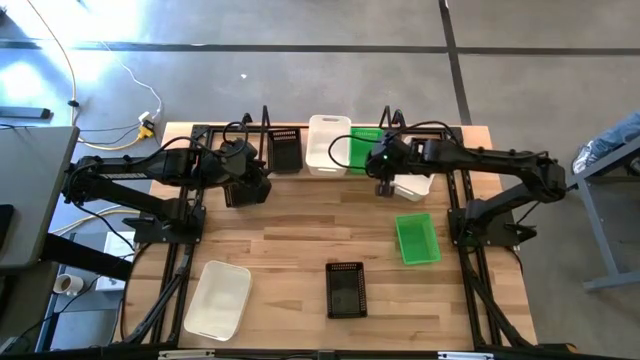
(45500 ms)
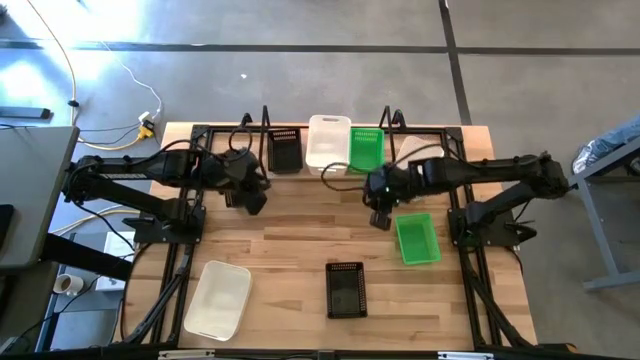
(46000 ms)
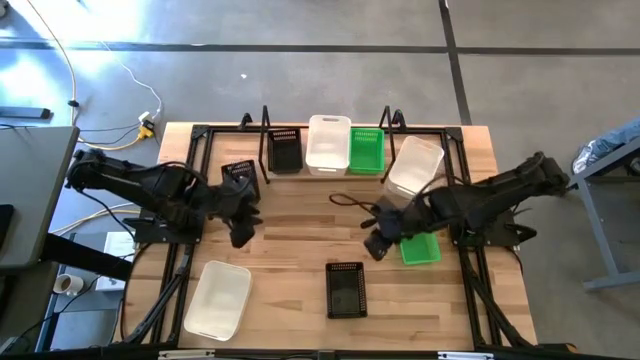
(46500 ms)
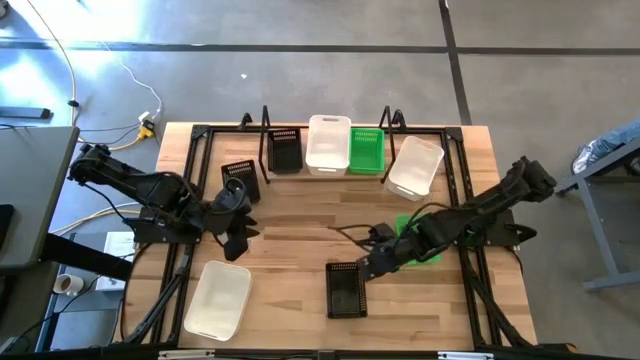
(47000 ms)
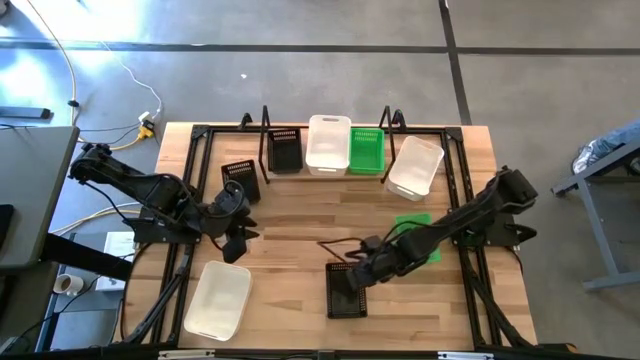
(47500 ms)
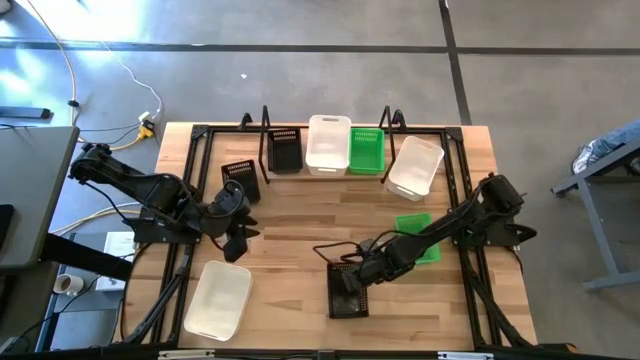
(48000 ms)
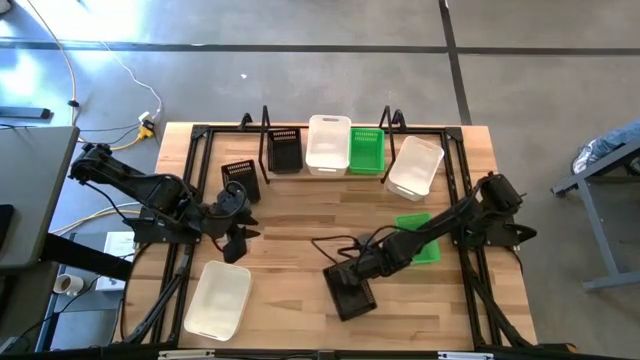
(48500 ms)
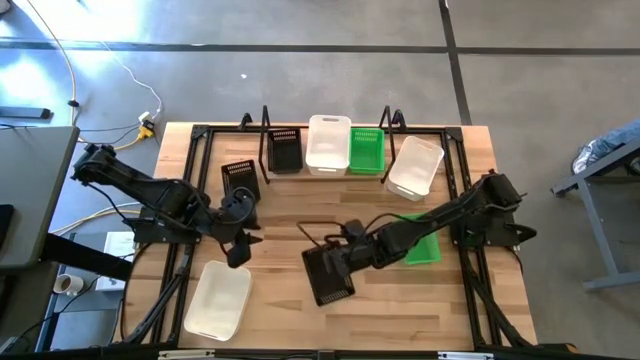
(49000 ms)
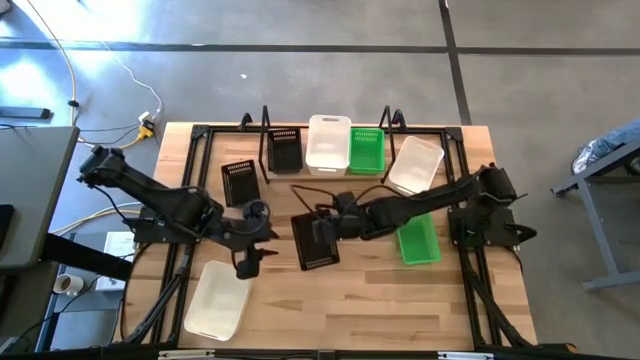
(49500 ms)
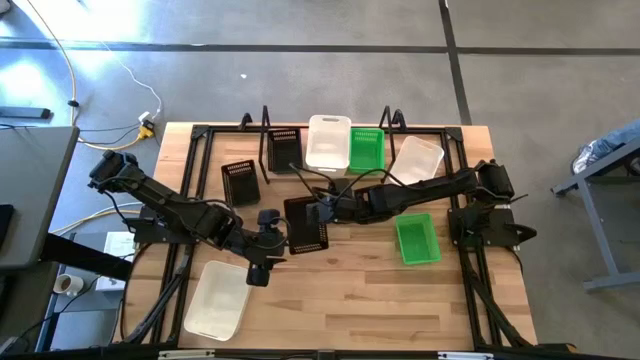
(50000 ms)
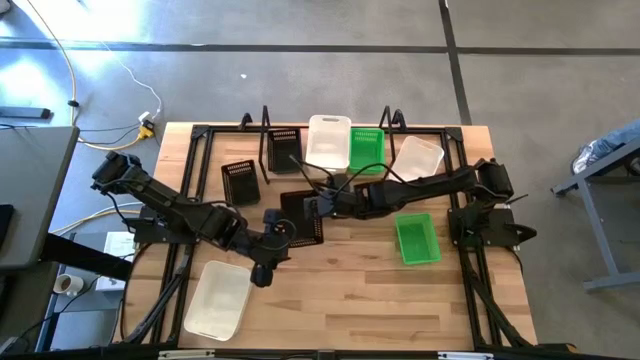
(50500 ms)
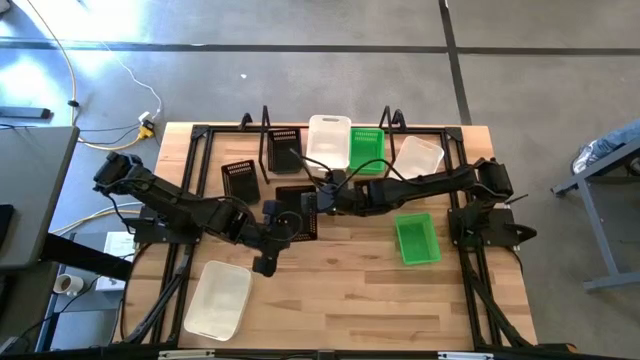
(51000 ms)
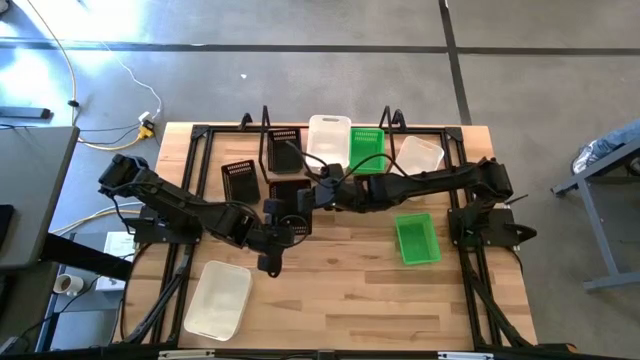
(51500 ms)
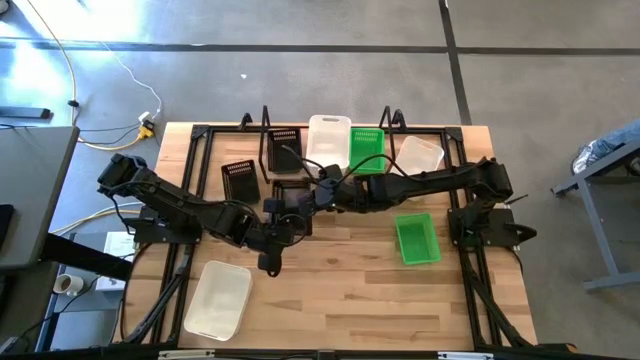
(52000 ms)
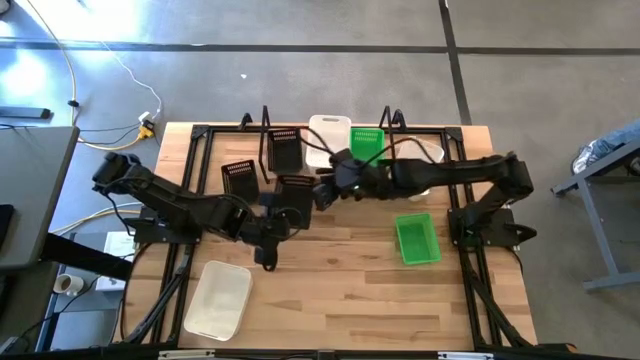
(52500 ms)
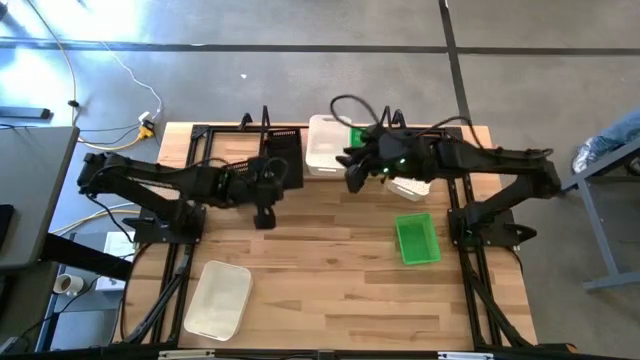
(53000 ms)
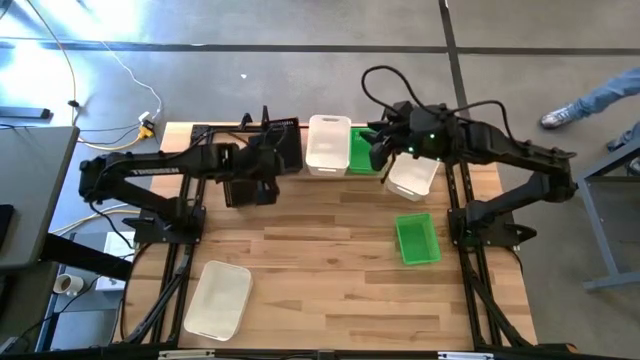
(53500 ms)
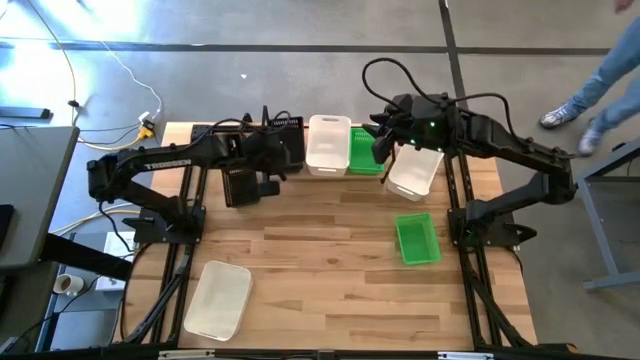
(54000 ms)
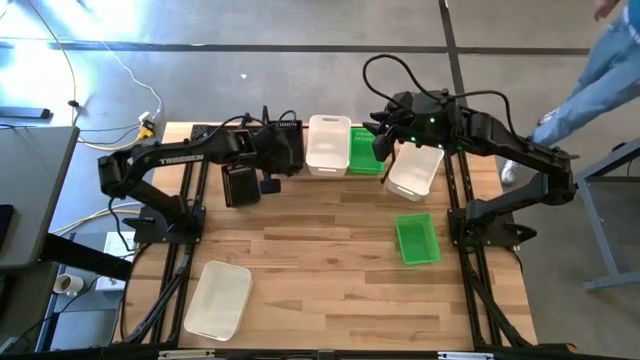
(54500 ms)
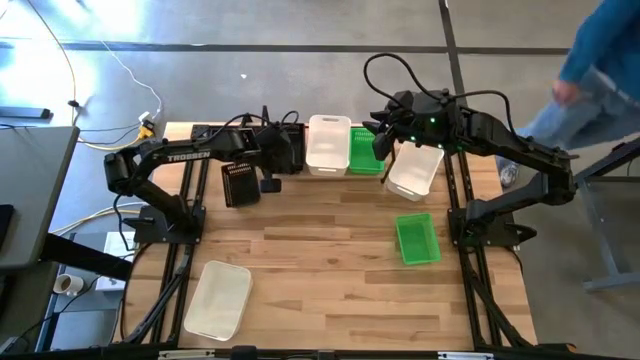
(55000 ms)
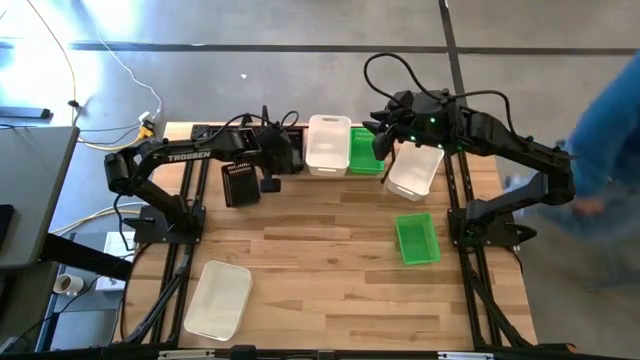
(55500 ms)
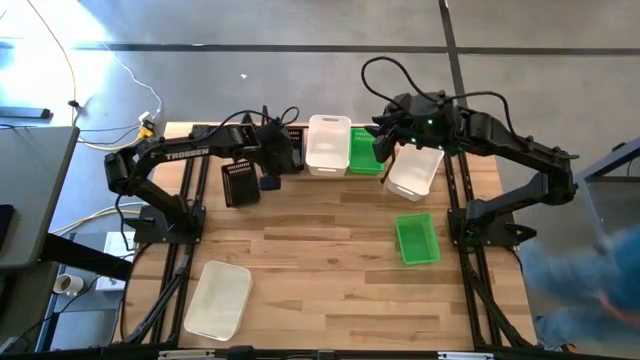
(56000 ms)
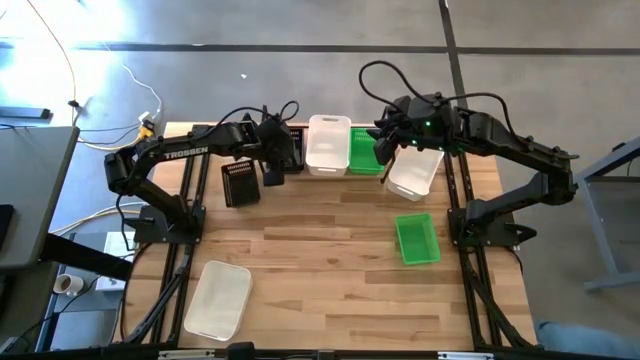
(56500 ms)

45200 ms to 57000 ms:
Task: Stack baskets on shelf by color
Stack the bottom black basket on top of the other black basket on the shelf

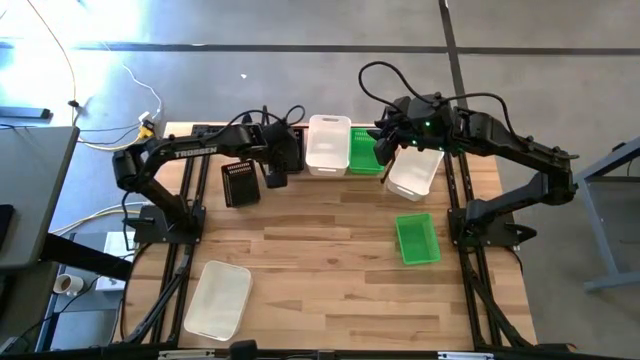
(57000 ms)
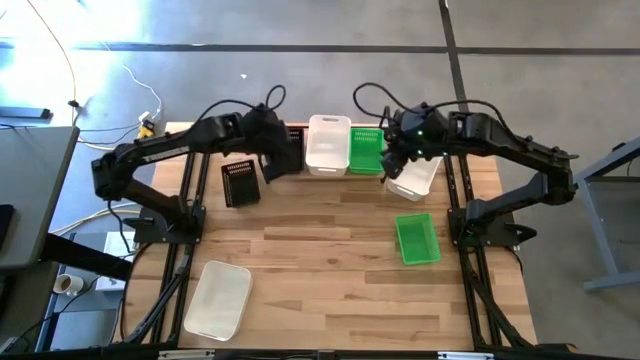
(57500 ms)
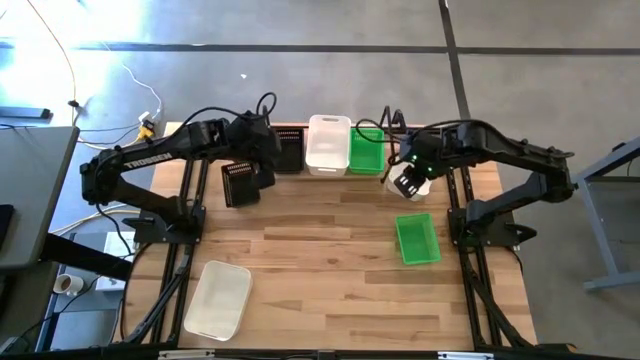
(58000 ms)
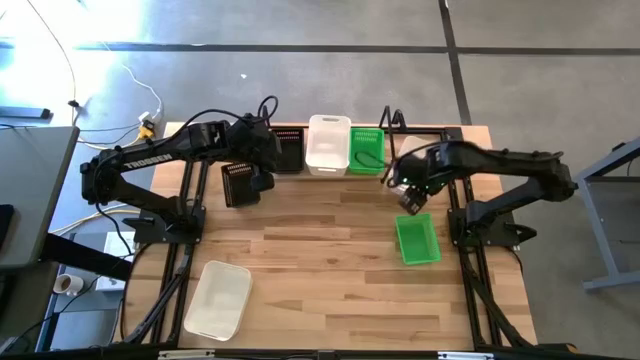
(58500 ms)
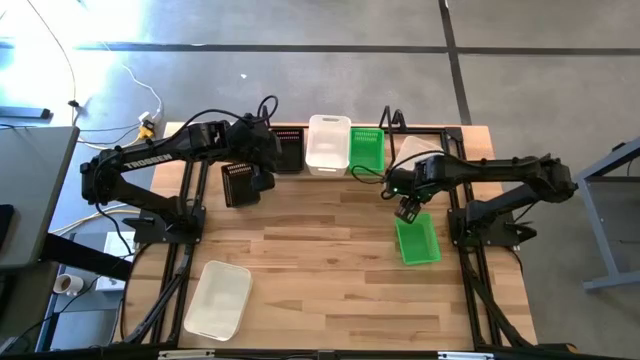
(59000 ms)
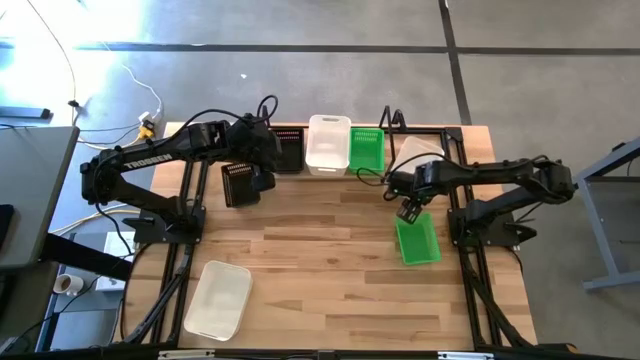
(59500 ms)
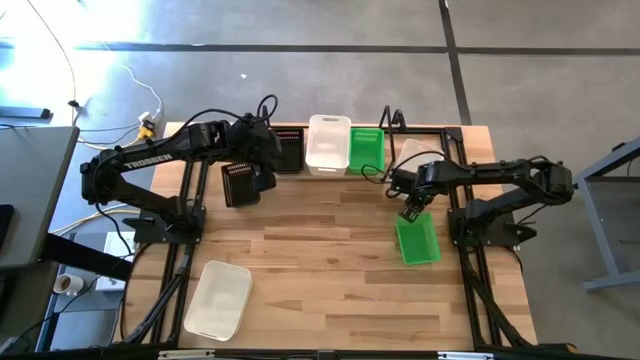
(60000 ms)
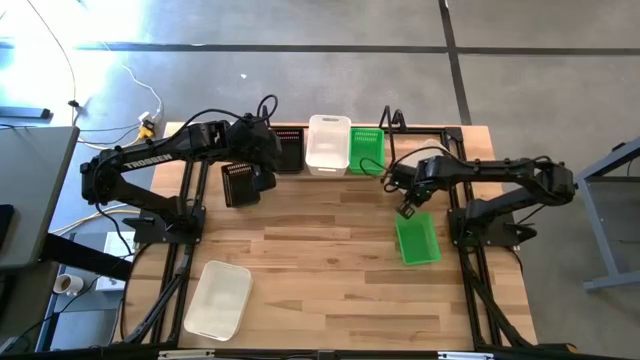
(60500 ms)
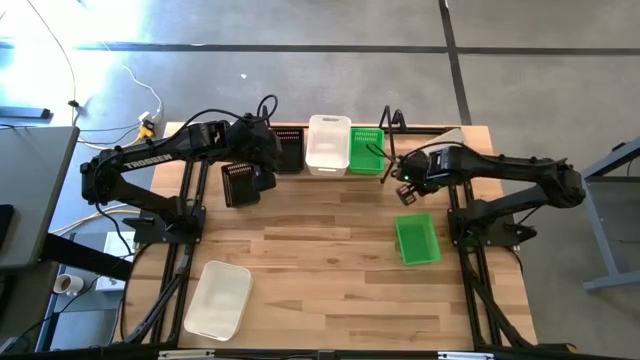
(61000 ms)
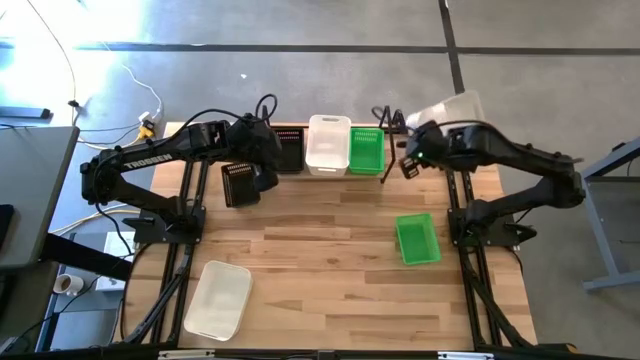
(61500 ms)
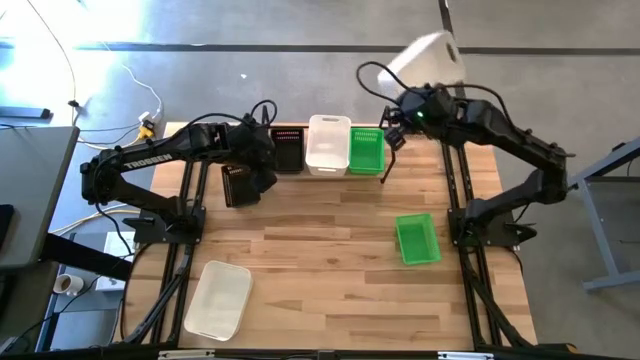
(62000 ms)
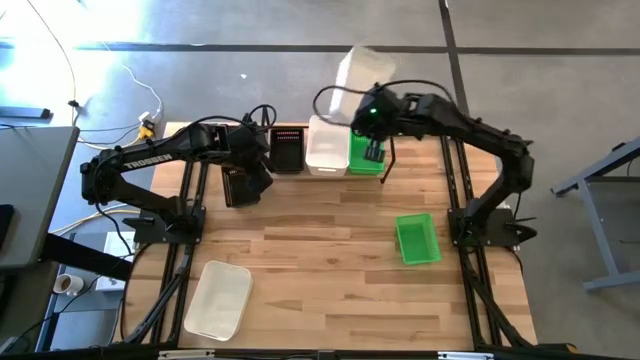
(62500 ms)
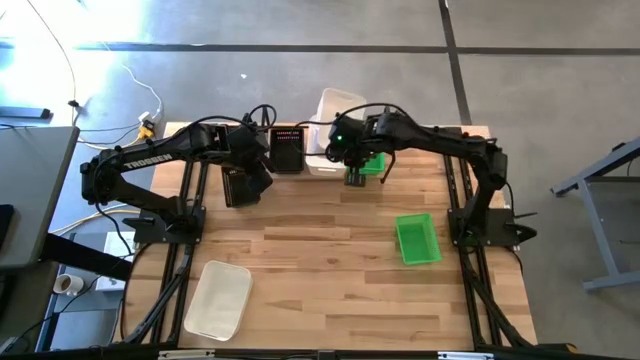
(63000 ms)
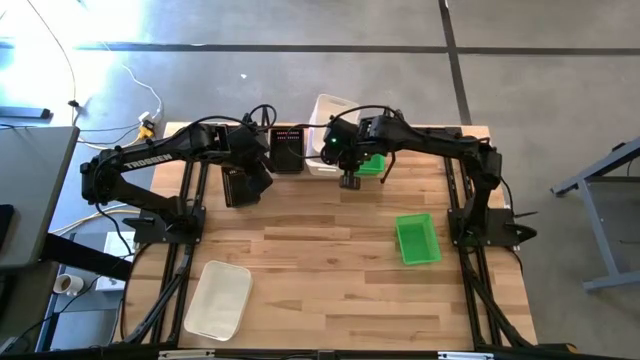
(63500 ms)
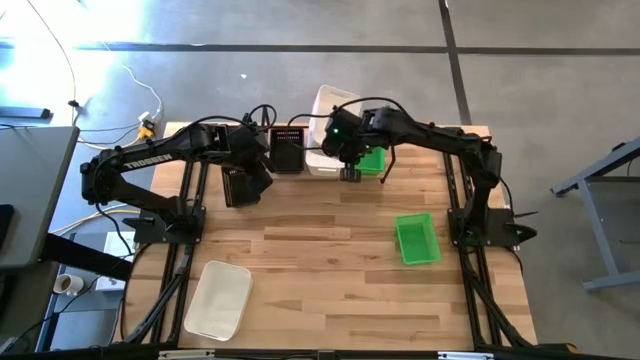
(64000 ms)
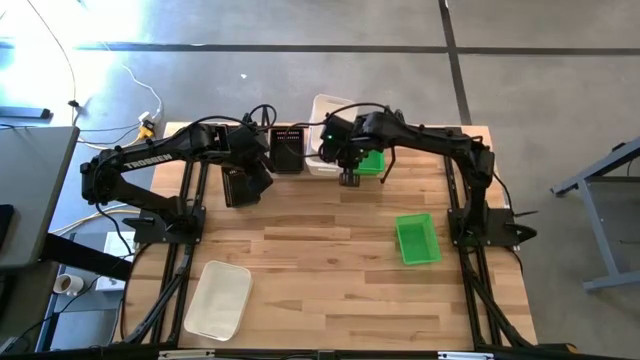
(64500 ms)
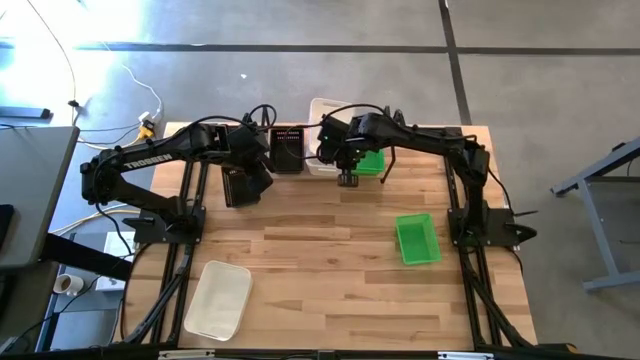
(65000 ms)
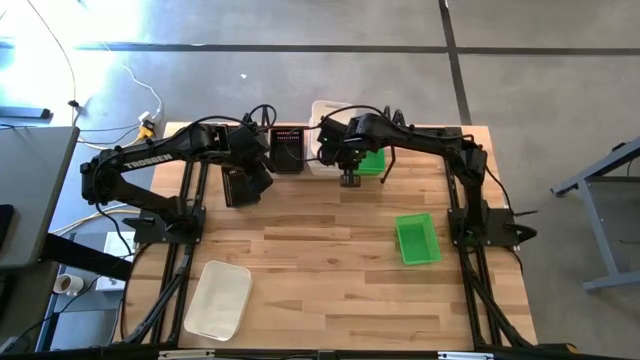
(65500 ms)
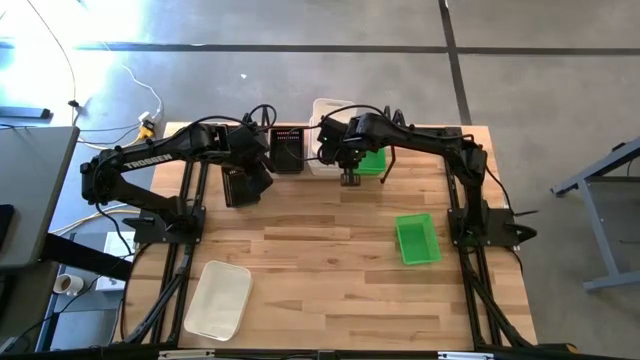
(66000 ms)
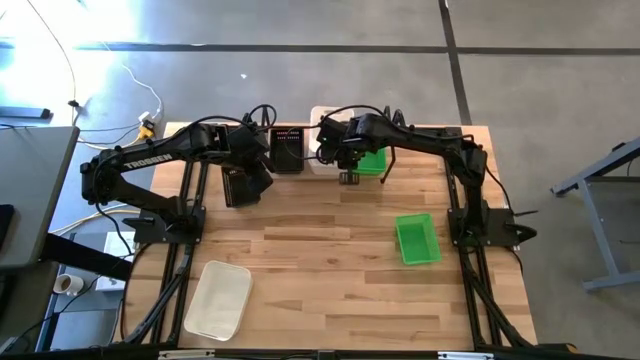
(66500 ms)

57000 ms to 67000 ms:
Stack the top white bin on top of the other white bin on the shelf
